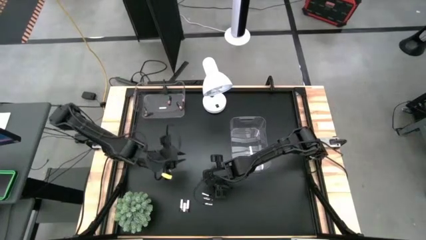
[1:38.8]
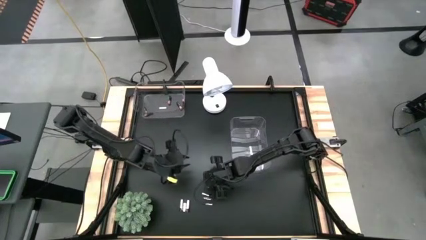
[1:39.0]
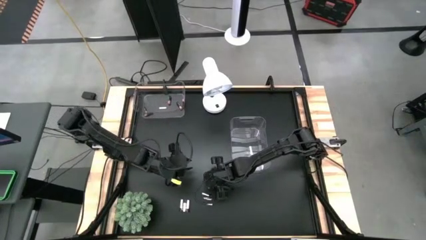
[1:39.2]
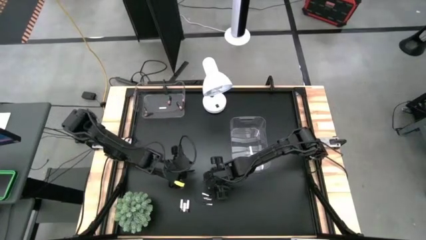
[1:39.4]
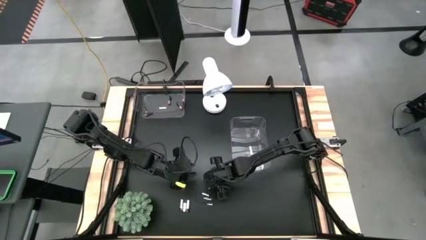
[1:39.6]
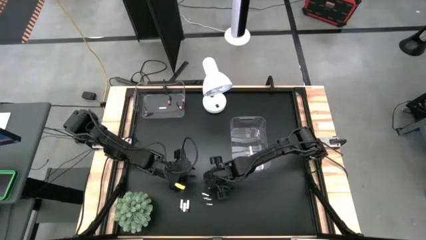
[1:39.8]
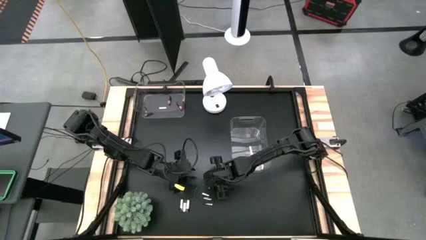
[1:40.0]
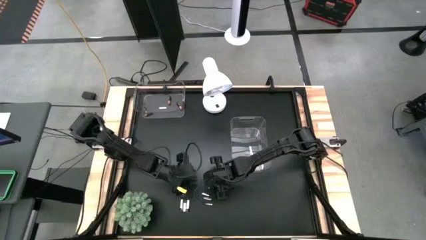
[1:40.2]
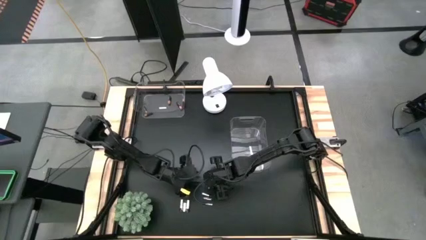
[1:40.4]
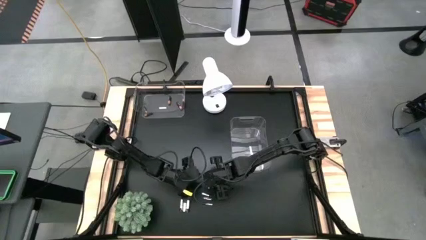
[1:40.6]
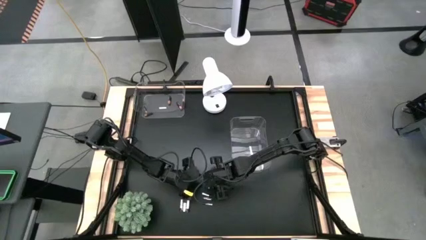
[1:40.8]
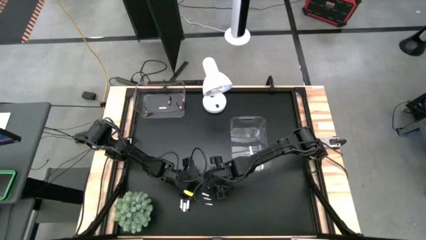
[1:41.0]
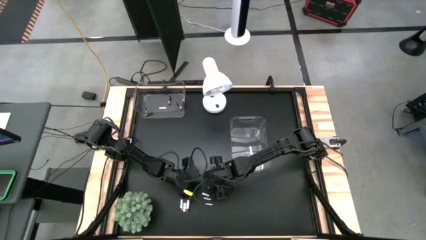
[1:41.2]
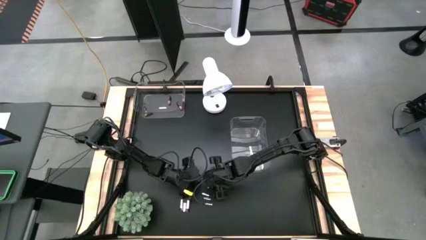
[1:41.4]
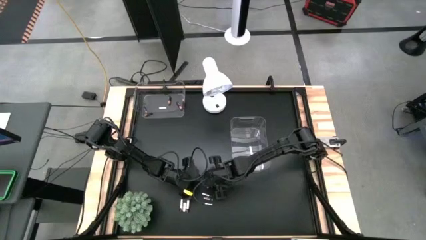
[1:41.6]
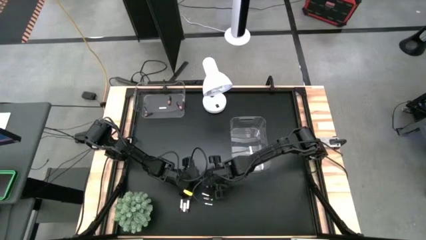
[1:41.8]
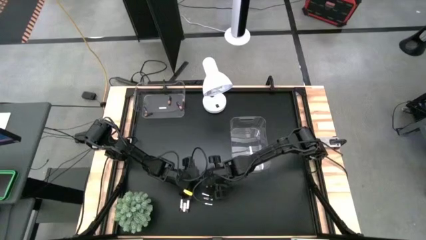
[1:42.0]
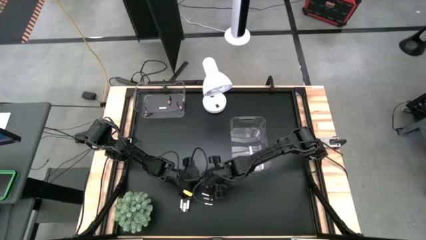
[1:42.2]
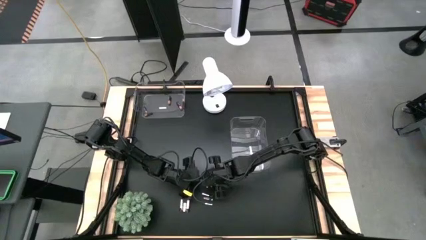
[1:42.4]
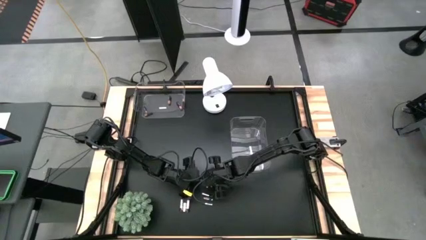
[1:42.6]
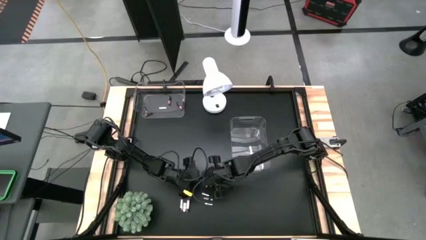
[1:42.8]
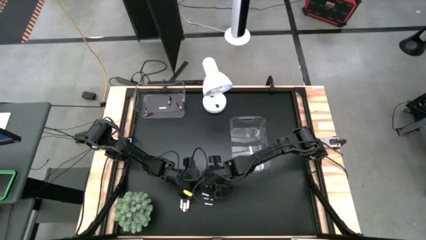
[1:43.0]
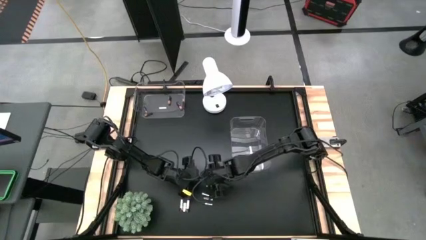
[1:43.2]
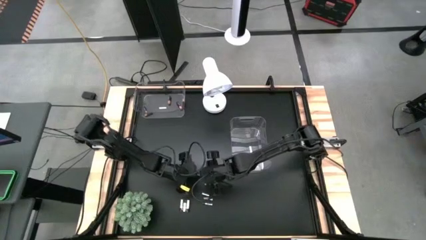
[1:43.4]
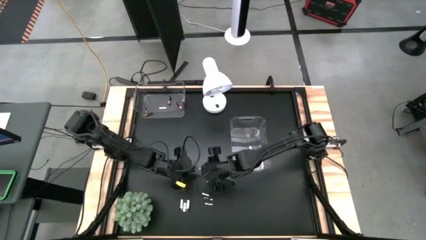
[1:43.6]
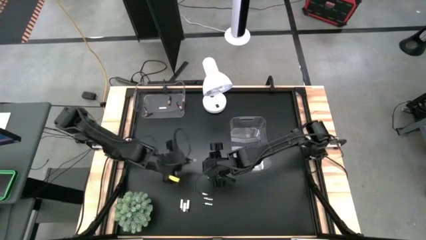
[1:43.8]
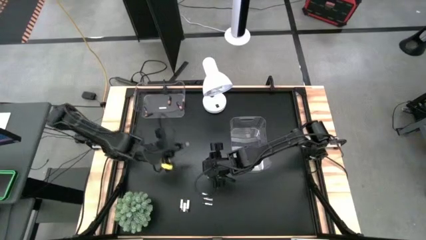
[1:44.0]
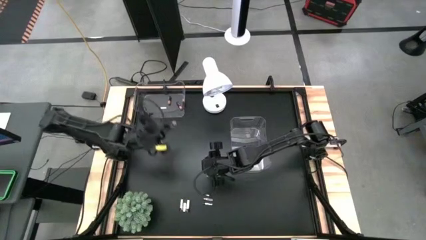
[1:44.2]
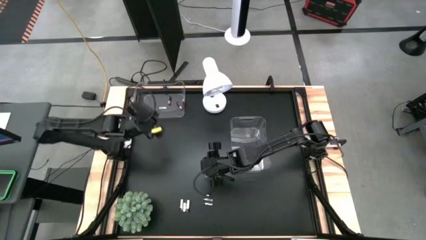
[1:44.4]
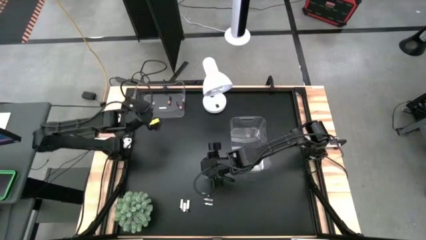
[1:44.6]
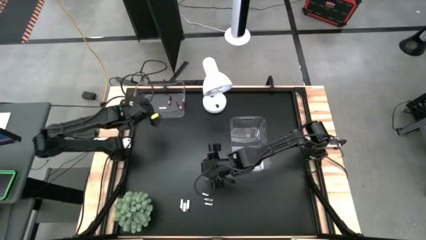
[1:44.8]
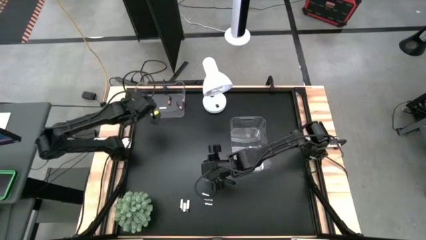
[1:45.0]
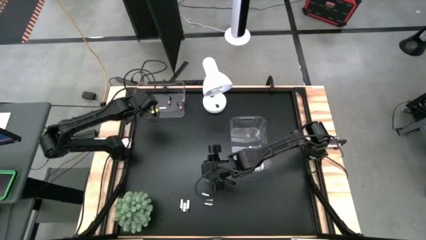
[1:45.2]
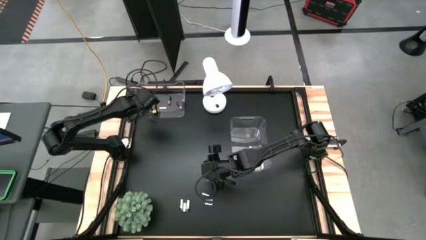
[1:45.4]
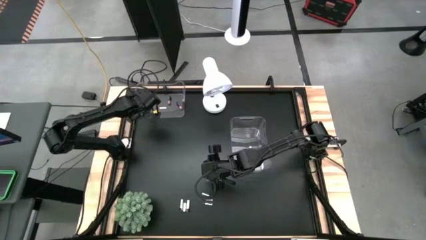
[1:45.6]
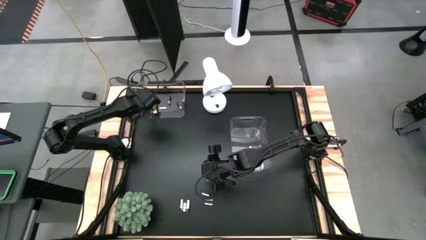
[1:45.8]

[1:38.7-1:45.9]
Task: Sort batteries
Put the black battery into the top transparent bin

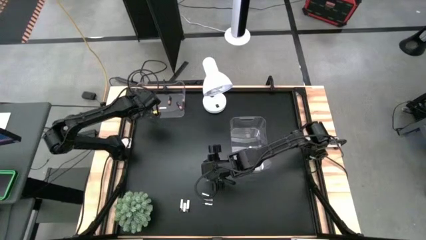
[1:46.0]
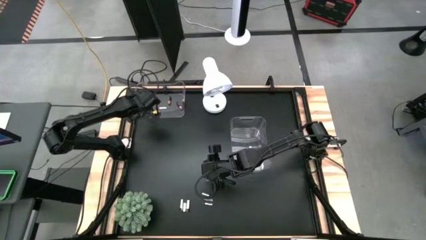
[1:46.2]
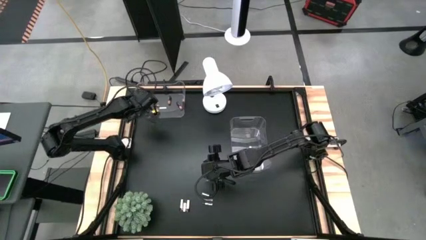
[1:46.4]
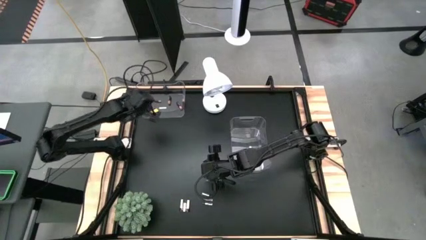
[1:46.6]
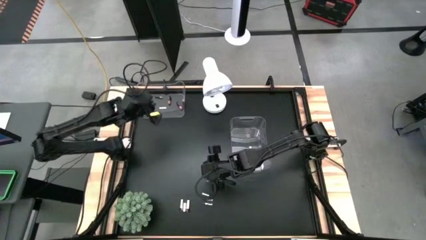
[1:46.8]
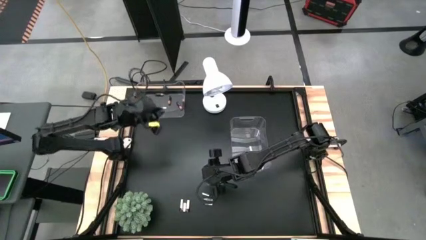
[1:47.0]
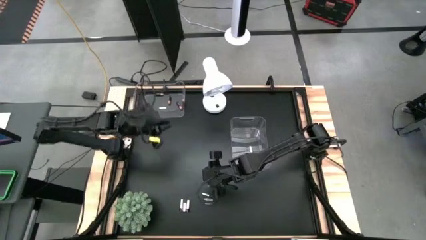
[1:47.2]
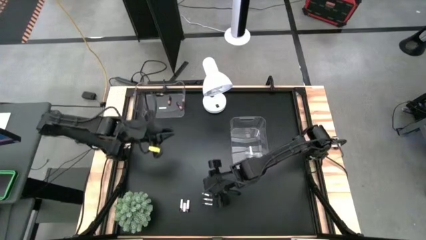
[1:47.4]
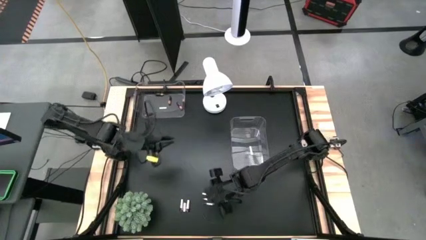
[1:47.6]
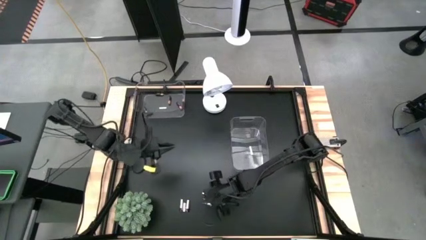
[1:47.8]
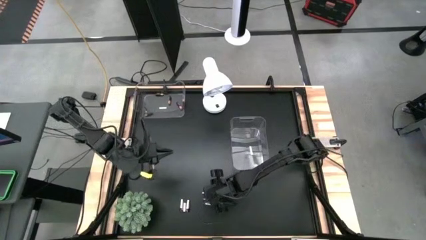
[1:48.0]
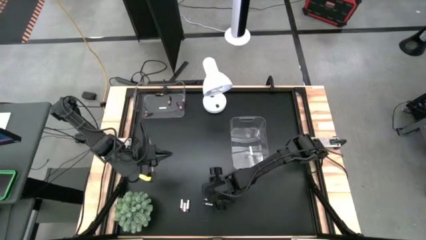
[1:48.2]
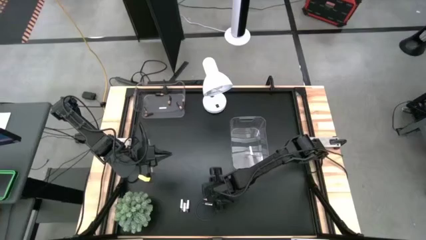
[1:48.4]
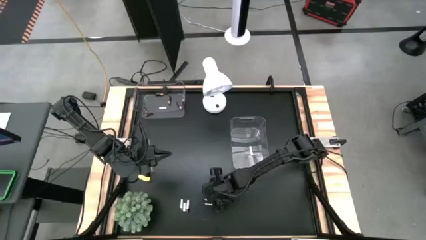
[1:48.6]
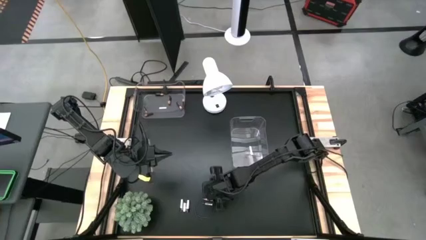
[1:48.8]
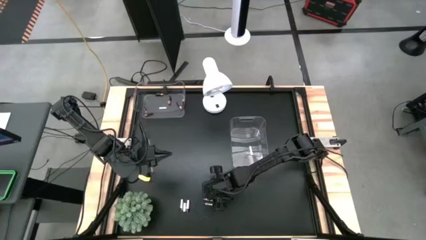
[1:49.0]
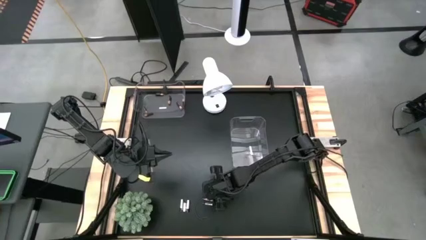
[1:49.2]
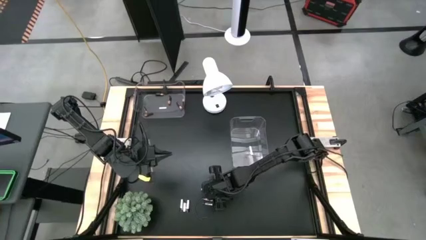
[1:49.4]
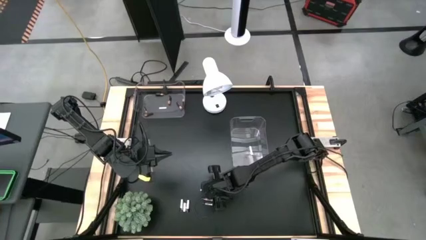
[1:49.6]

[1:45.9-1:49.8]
Put the silver battery into the bottom transparent bin

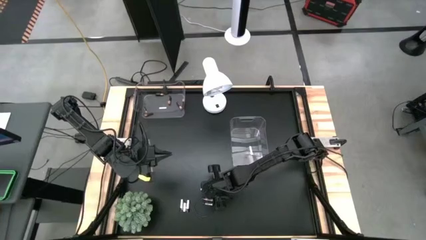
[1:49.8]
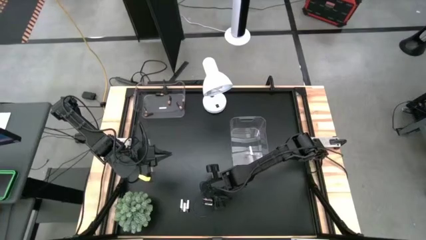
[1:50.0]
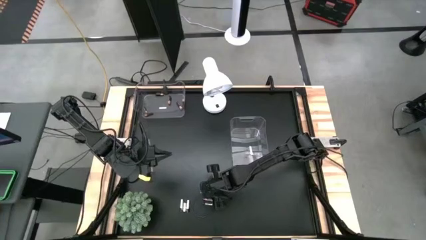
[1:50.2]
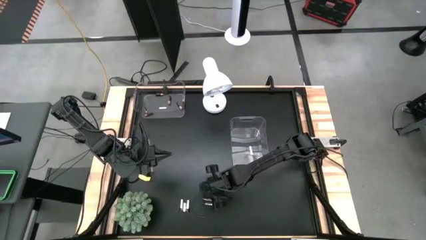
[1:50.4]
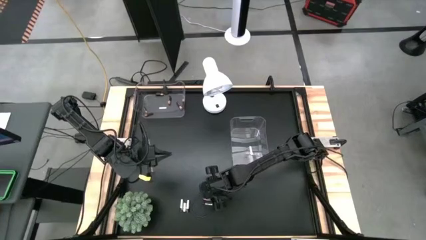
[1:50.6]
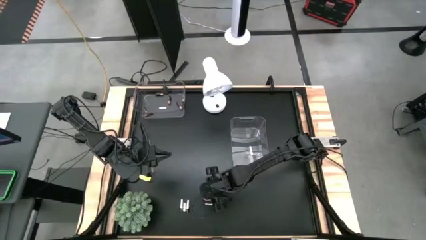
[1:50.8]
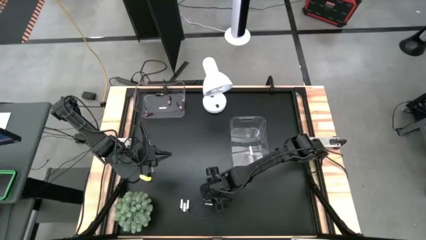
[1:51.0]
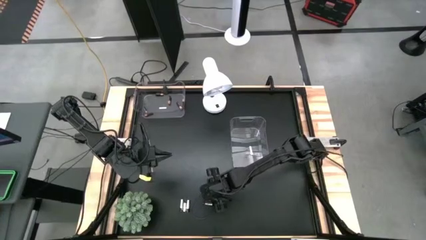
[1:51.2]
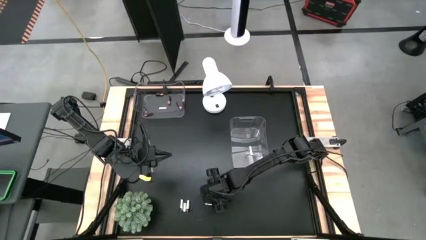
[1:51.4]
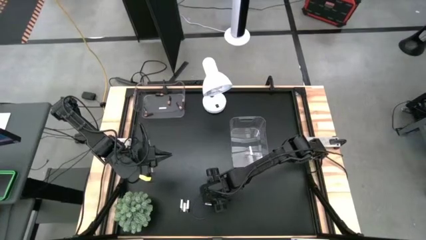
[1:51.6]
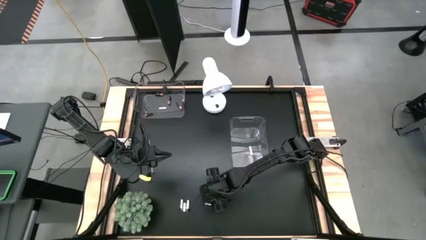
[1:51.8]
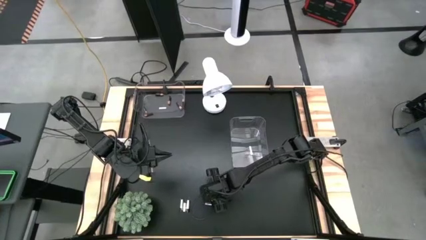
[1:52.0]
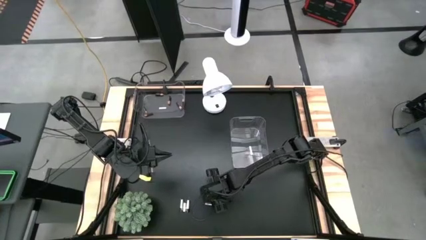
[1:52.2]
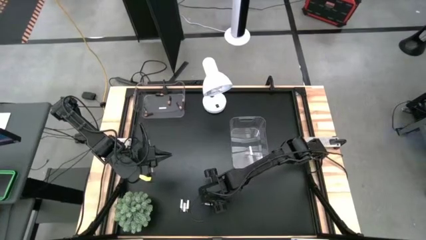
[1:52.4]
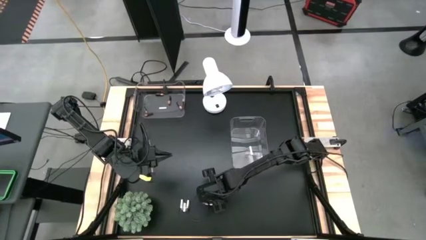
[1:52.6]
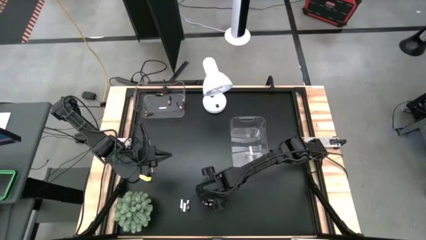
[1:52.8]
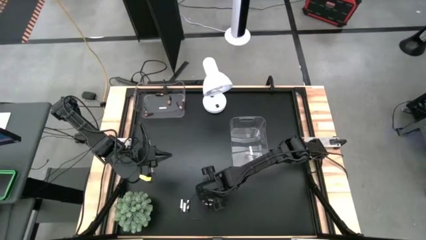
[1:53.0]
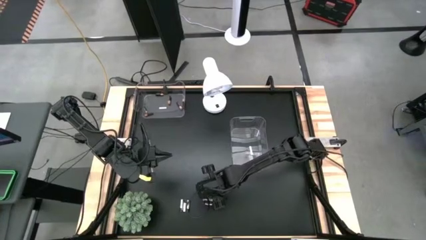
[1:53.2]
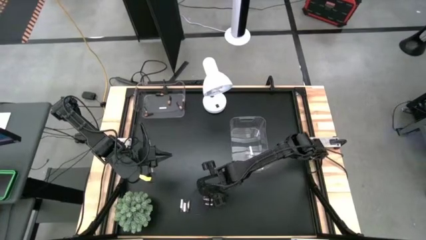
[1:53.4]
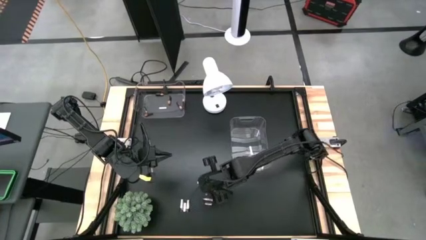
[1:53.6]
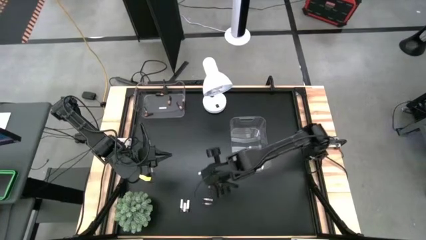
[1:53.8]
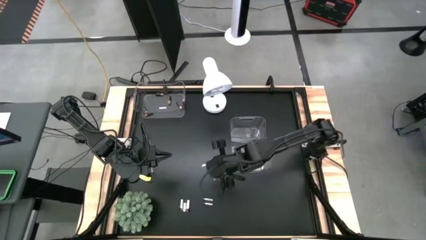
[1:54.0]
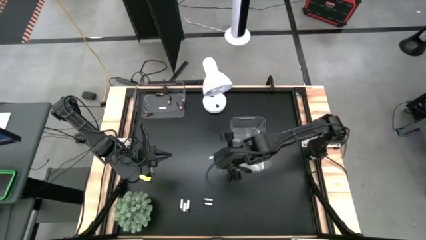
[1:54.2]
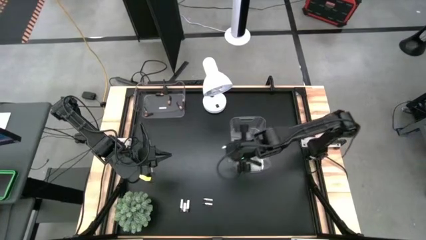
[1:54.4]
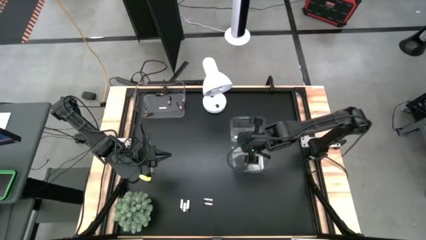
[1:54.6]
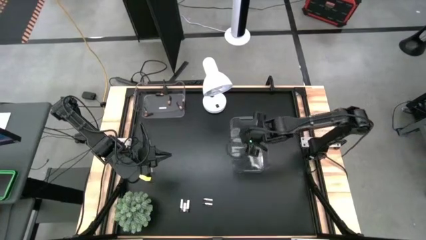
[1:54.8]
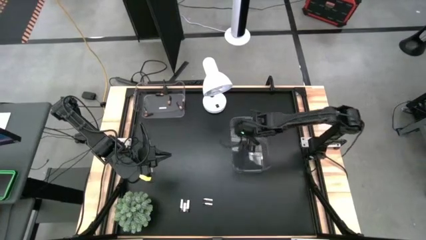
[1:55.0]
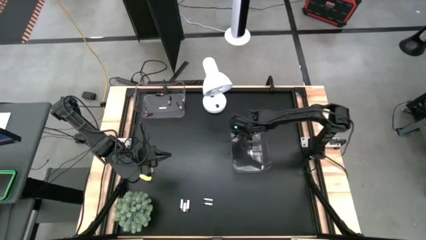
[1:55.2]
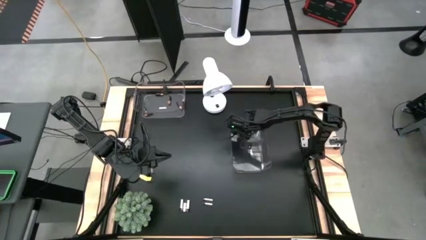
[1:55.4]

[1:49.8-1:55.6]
Put the silver battery into the bottom transparent bin
